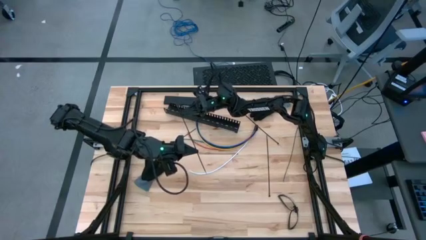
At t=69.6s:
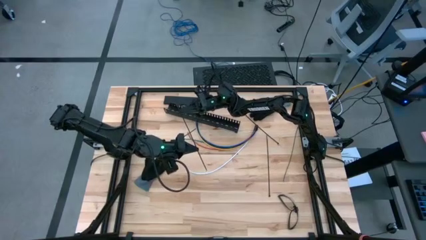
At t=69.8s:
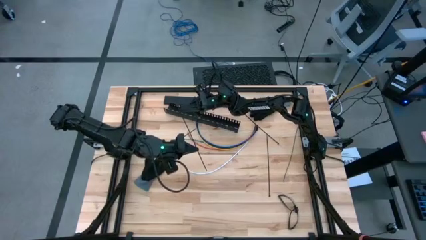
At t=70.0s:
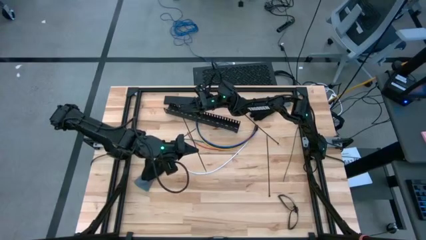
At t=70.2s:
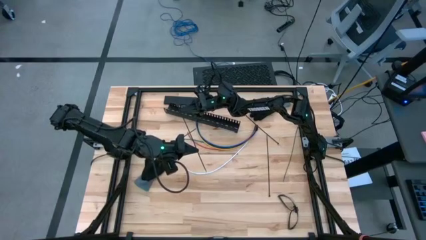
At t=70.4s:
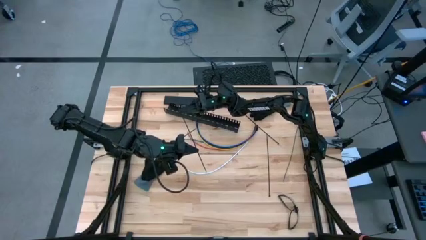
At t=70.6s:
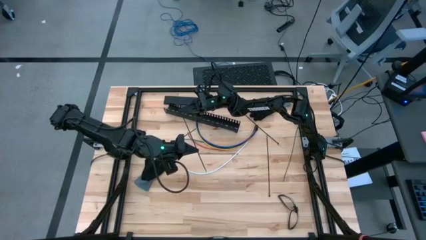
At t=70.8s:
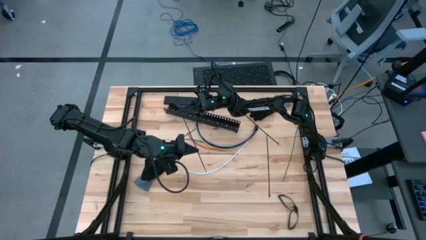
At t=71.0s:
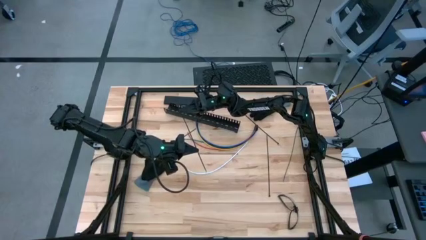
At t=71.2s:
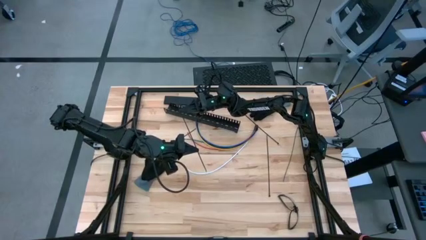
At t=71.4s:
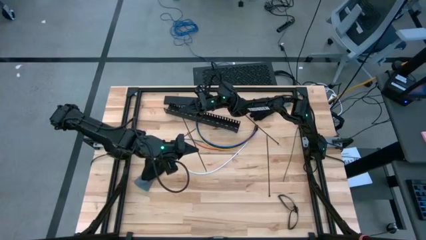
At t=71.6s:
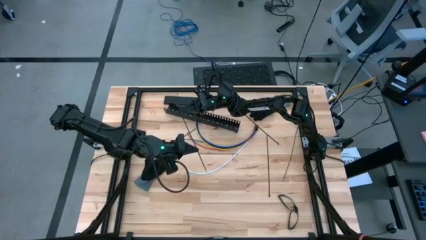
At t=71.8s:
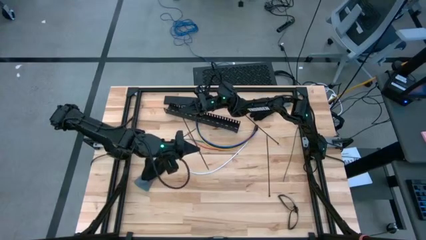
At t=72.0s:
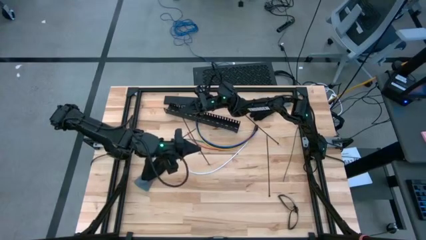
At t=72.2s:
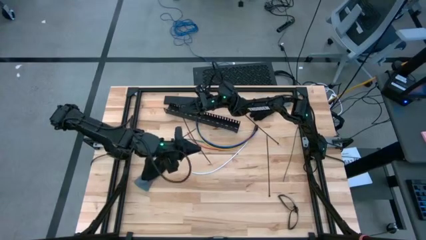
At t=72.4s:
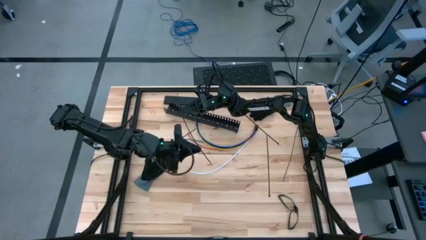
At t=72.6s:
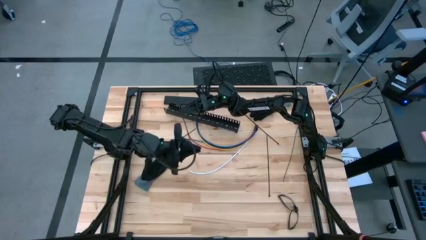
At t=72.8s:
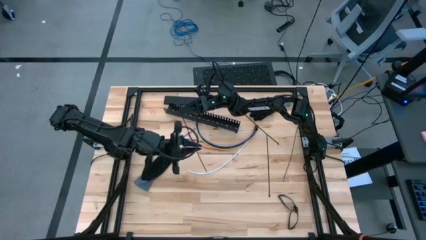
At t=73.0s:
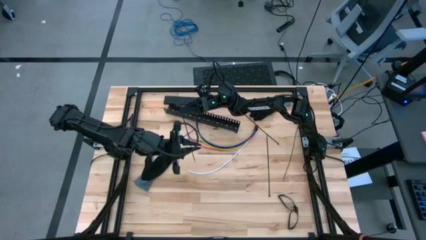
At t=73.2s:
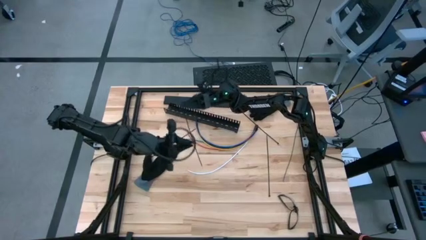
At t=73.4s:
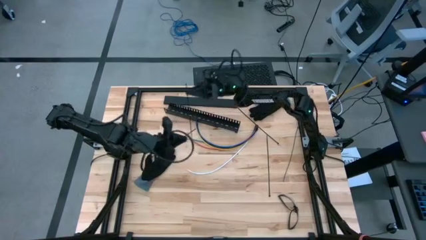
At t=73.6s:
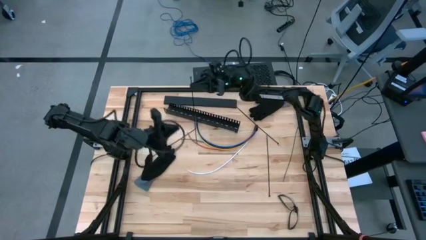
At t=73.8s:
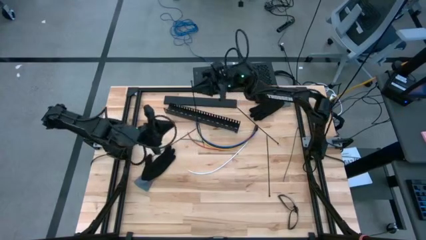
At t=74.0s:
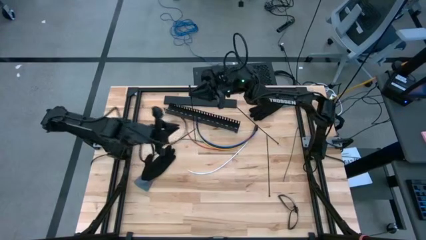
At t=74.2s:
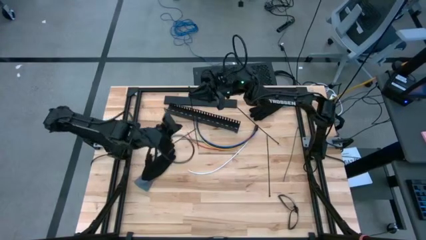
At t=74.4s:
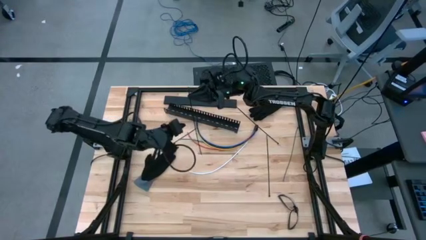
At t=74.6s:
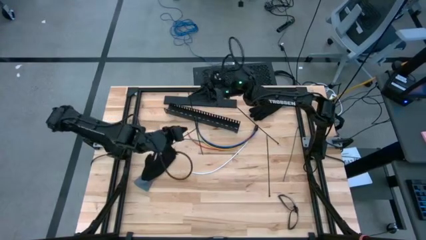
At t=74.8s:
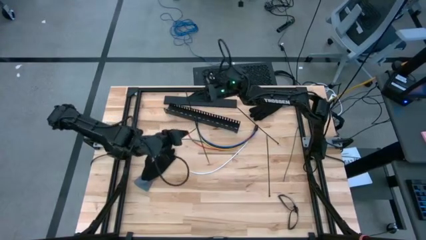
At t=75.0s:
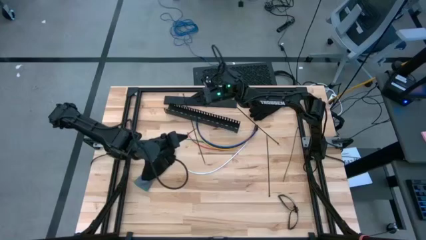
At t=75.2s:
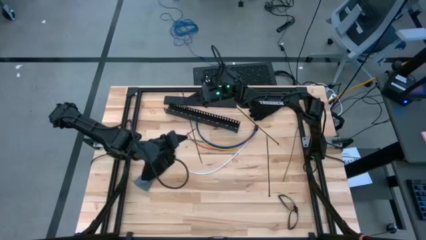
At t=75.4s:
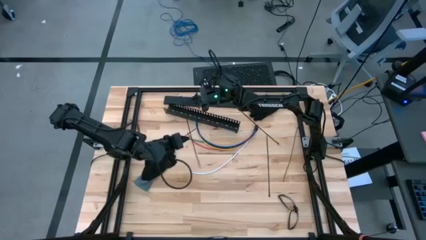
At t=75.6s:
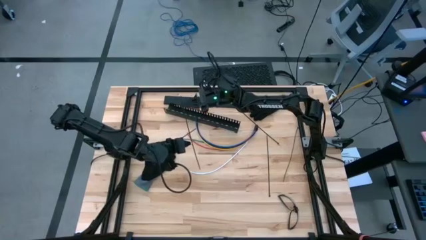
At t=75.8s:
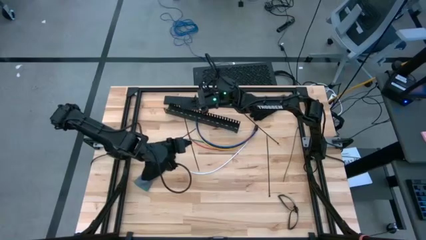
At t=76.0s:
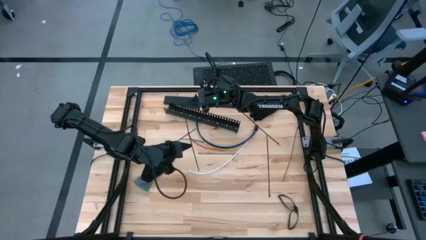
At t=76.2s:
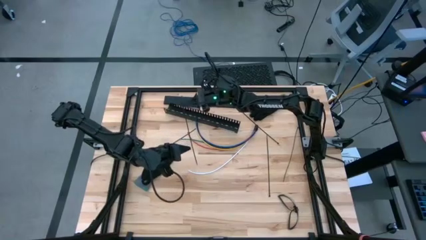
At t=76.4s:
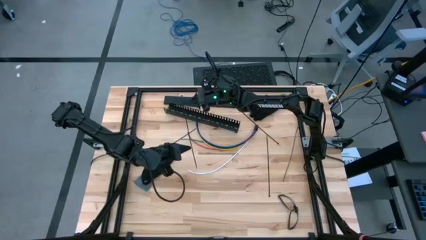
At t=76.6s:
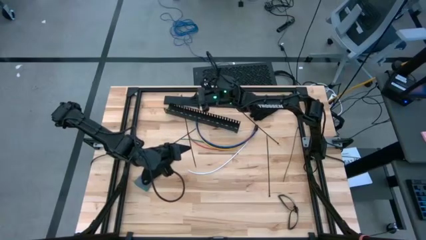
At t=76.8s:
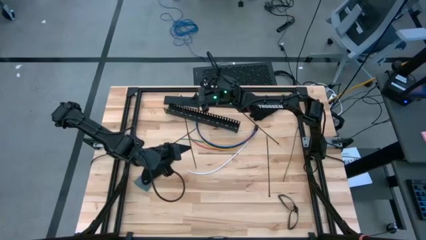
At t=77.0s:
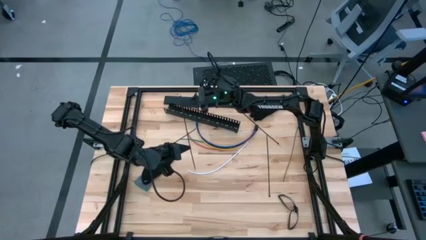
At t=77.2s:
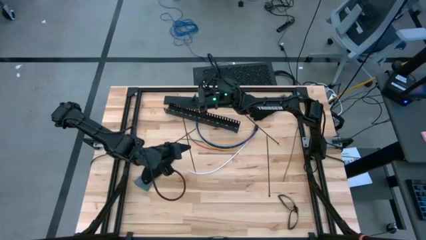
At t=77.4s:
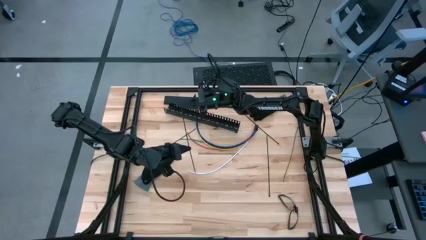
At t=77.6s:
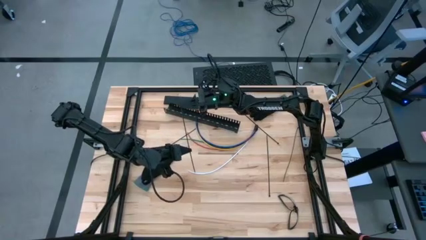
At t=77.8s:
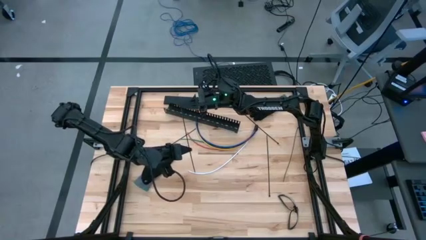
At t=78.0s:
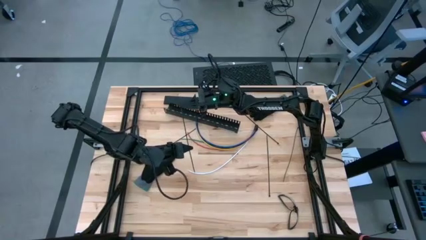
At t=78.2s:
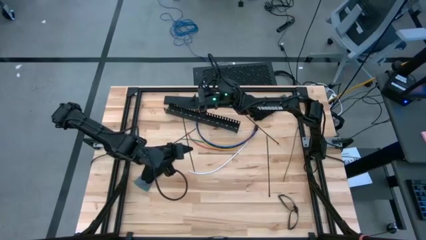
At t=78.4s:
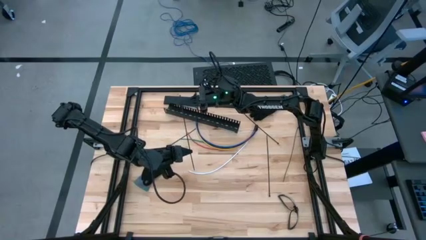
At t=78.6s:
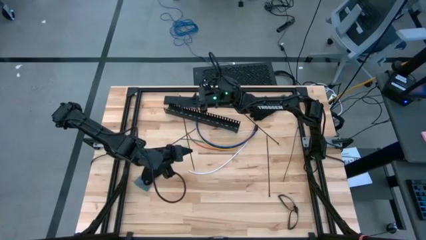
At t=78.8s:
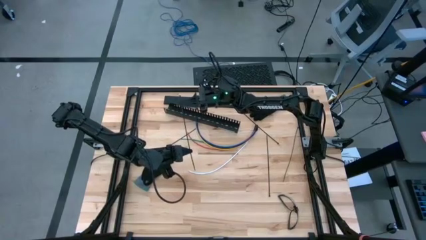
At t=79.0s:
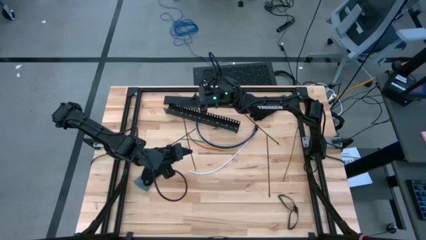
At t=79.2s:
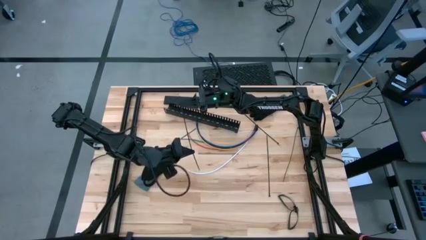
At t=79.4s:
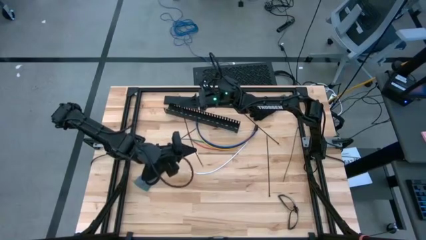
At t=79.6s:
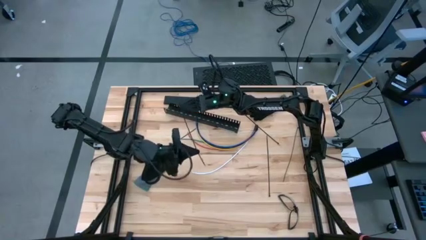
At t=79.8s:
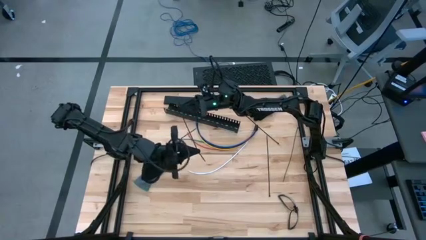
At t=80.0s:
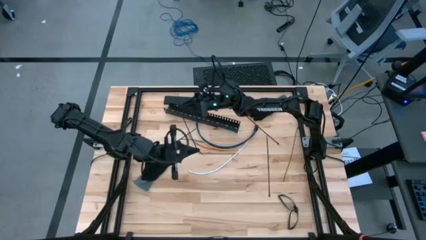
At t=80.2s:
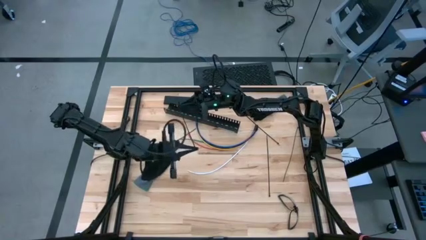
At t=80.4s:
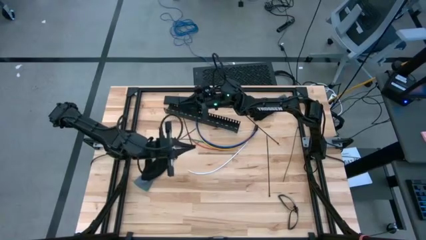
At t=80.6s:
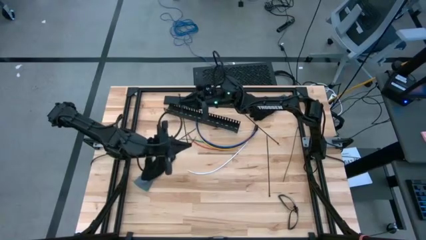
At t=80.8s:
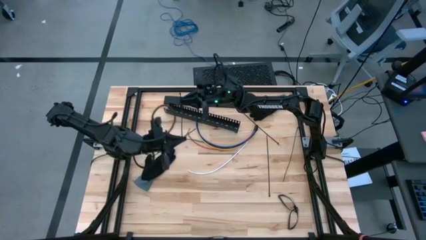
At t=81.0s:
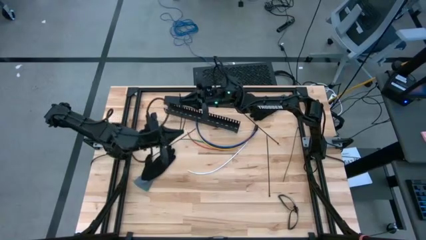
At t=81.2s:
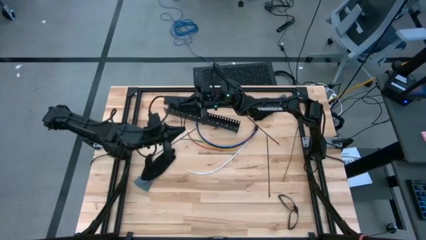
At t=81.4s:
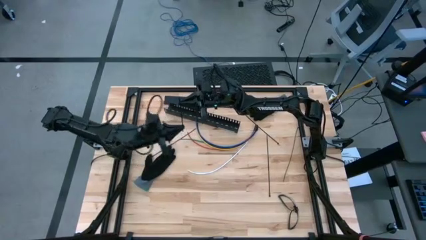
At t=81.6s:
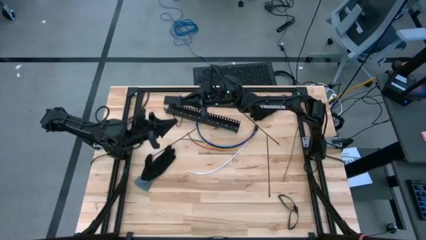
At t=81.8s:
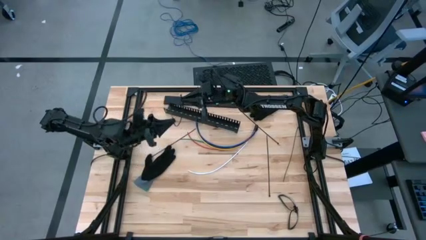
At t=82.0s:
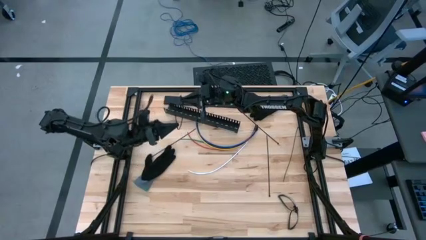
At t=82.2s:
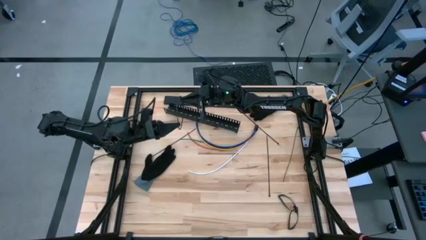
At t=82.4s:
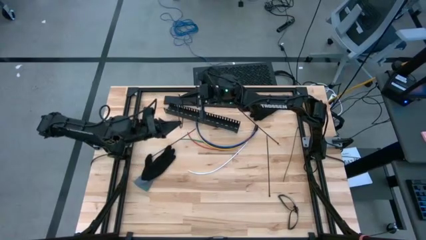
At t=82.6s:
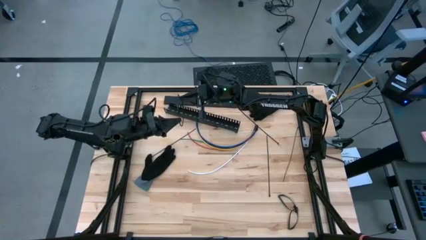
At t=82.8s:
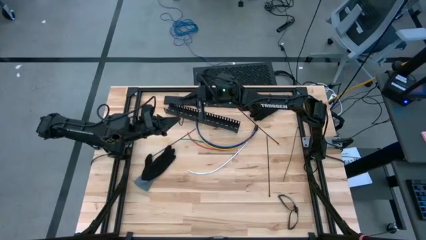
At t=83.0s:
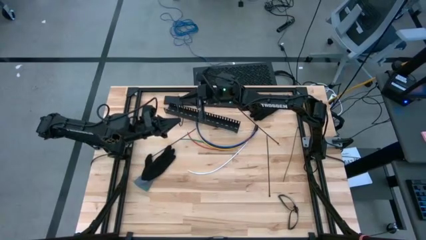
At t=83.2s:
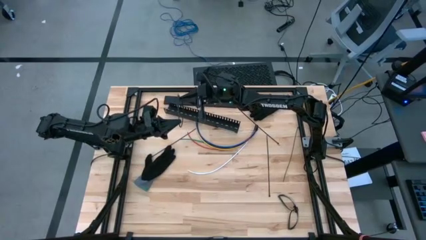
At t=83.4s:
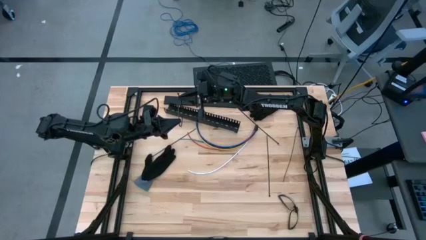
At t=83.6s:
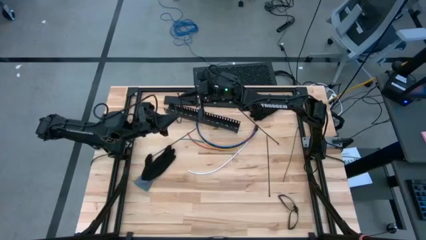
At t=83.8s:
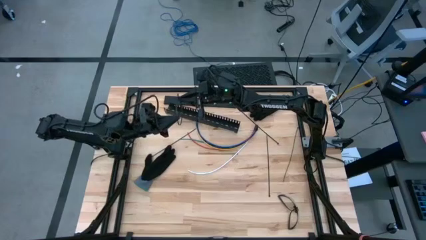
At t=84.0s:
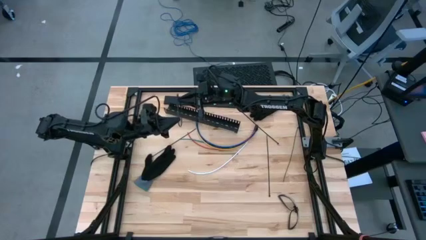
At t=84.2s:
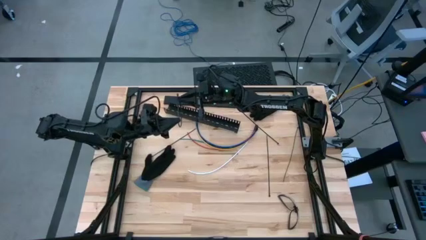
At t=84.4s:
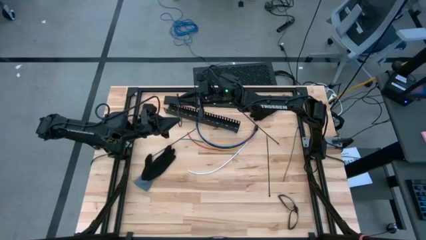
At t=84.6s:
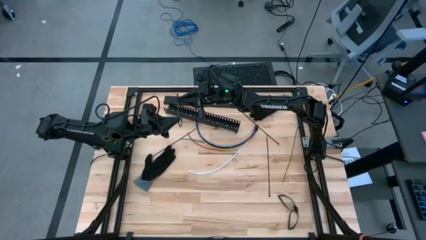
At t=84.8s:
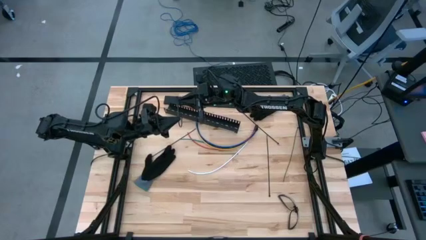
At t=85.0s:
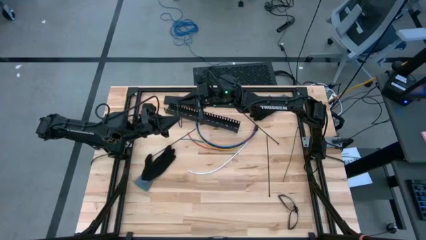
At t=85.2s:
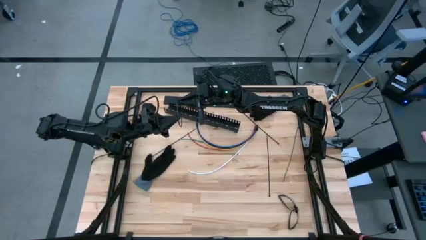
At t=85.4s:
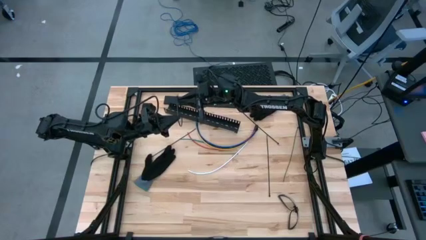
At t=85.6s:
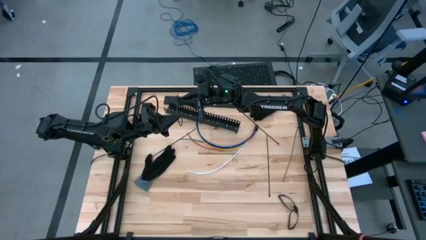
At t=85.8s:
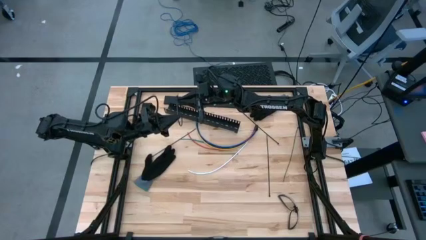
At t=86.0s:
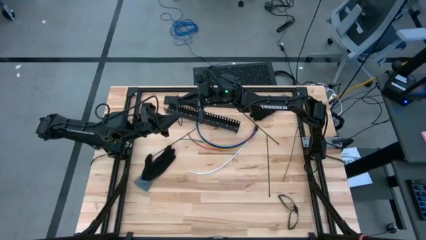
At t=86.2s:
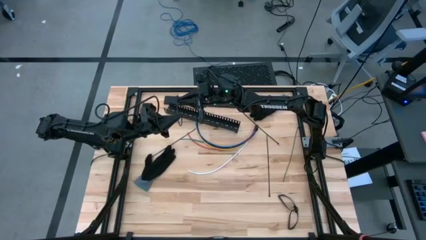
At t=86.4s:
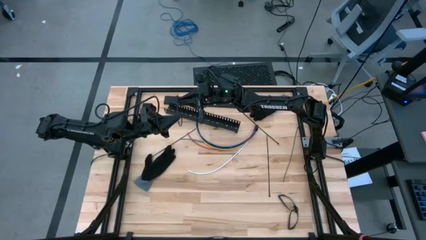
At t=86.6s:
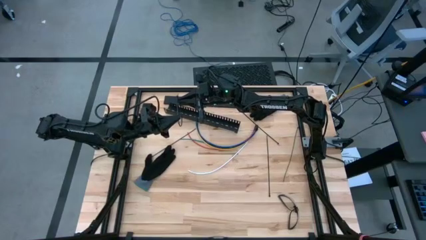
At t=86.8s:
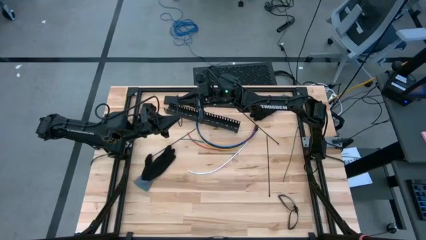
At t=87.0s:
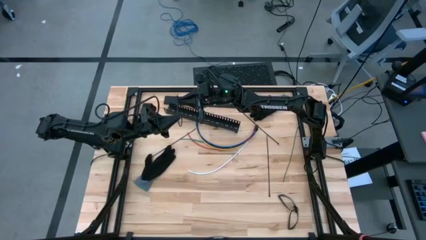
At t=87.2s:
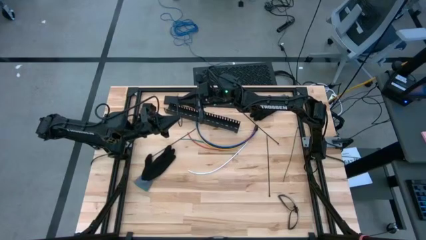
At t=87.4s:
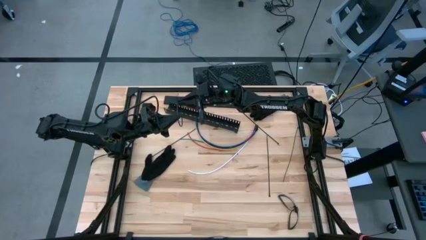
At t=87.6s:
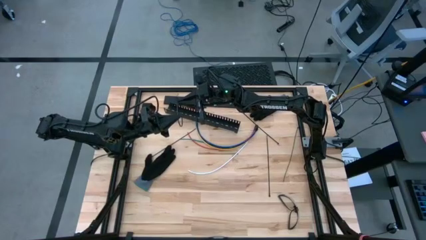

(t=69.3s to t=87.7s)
Task: Ziptie cables
Prepare the zip tie
